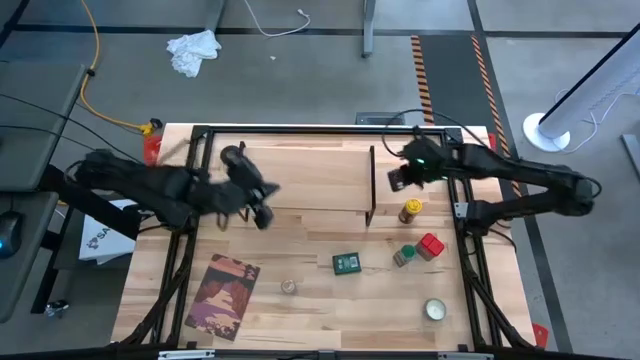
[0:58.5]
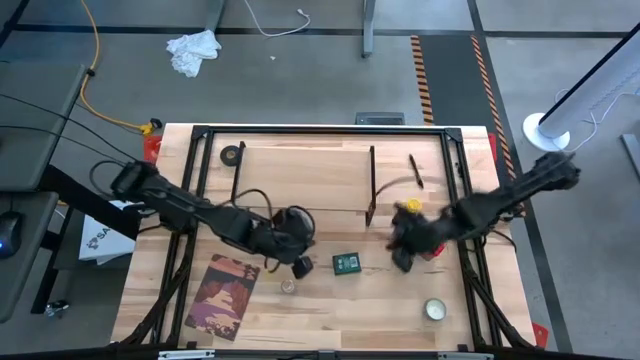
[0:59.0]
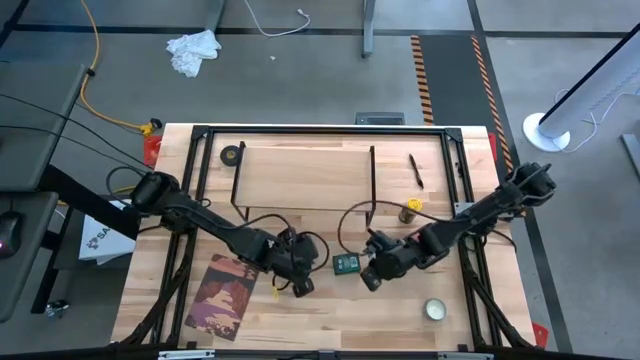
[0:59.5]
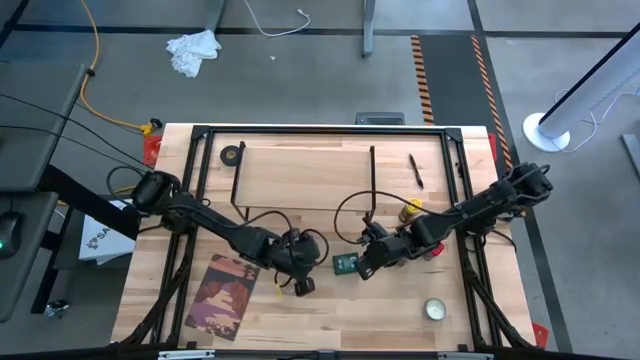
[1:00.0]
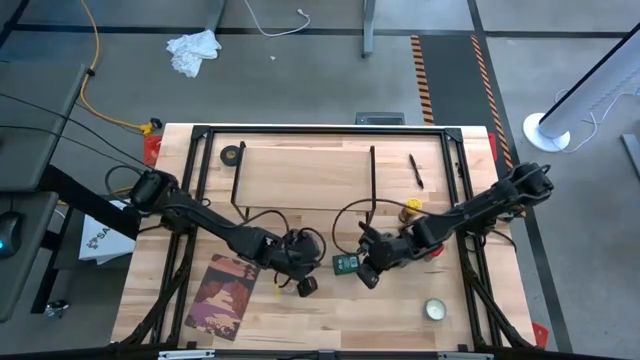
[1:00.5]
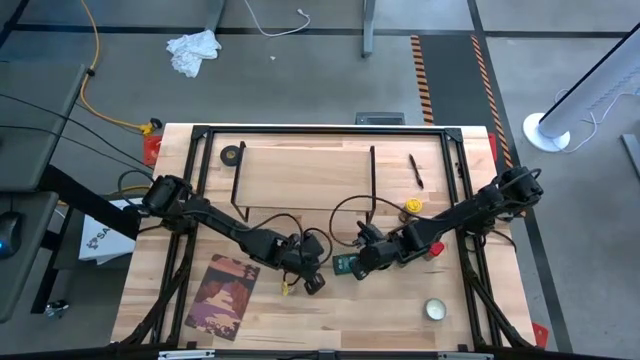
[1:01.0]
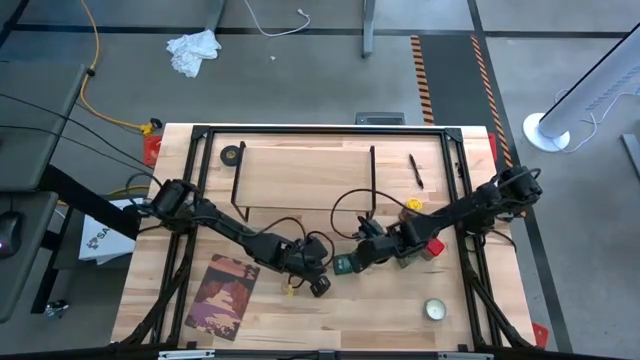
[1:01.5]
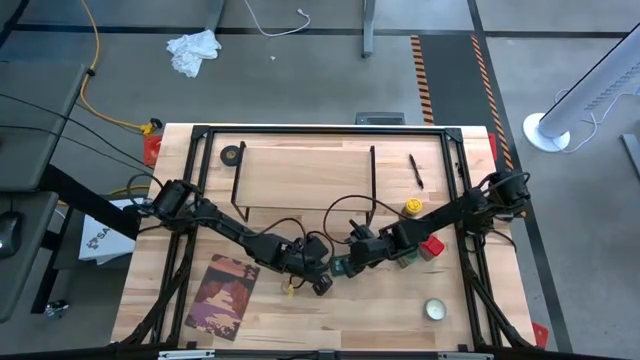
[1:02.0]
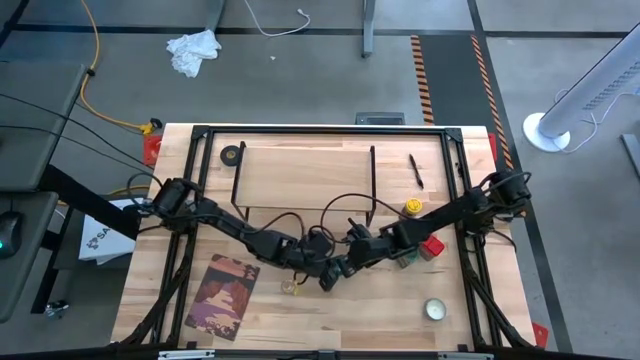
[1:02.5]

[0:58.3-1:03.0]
Task: Shelf spices
Put the green seasoning can on the shelf

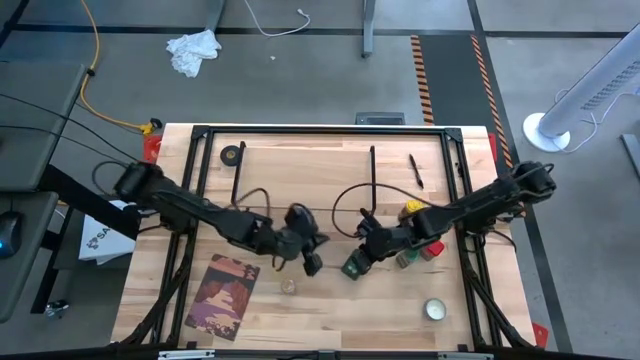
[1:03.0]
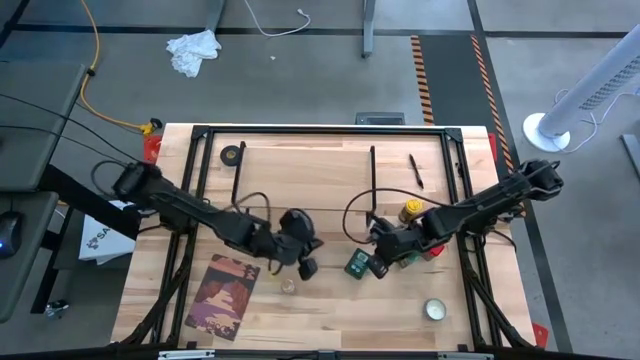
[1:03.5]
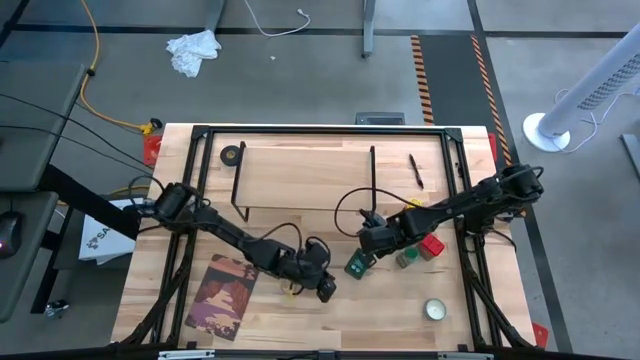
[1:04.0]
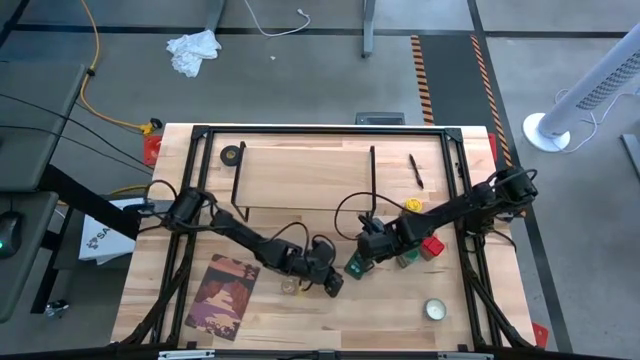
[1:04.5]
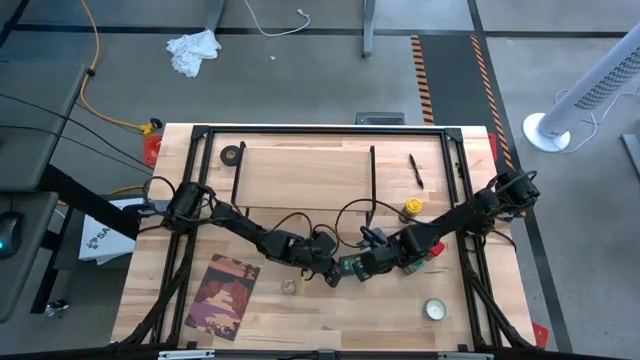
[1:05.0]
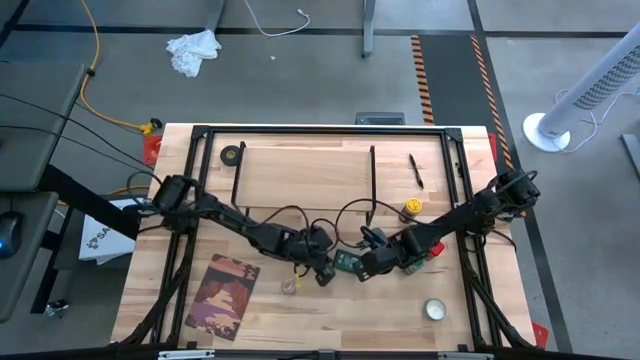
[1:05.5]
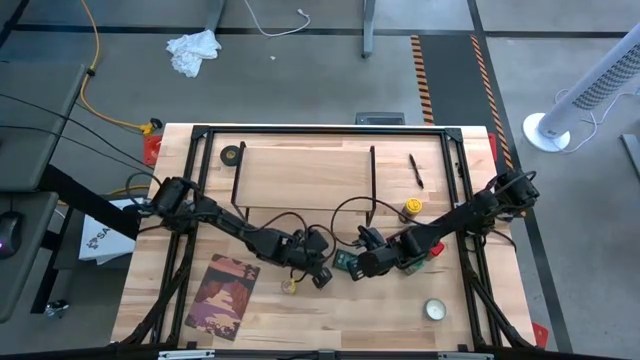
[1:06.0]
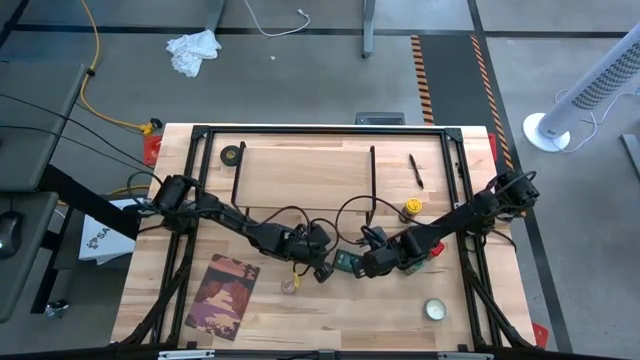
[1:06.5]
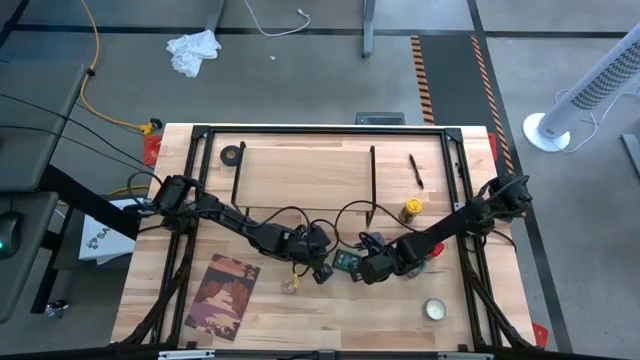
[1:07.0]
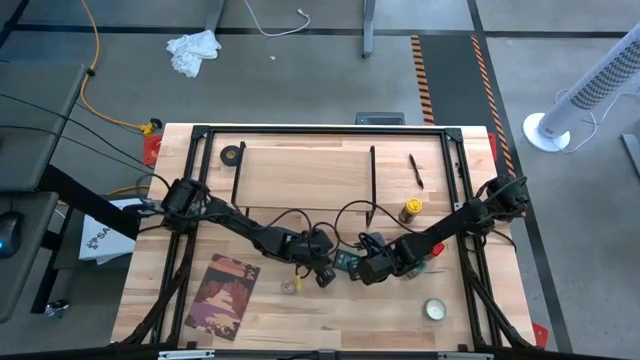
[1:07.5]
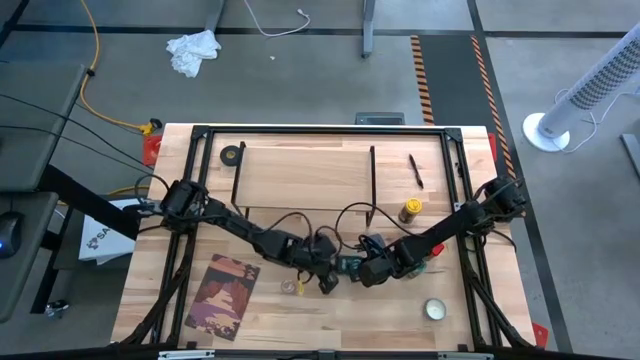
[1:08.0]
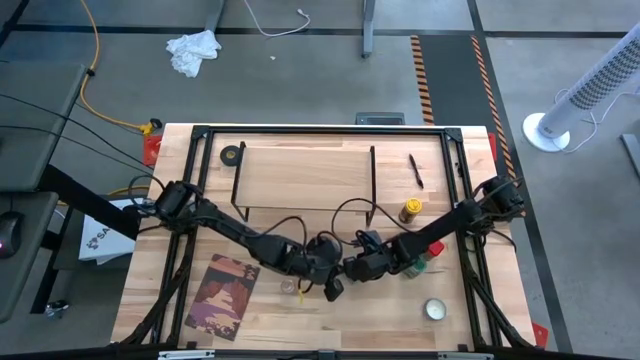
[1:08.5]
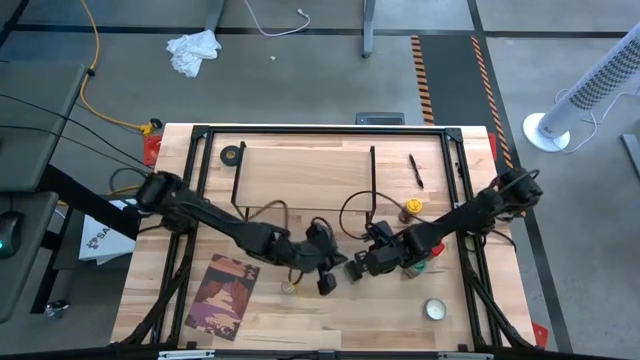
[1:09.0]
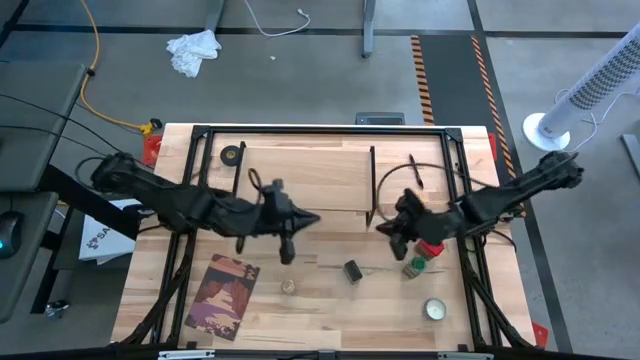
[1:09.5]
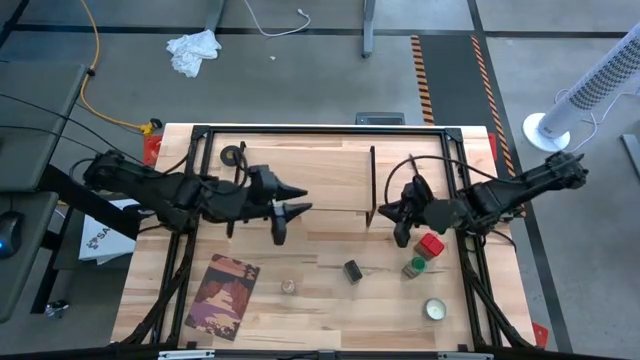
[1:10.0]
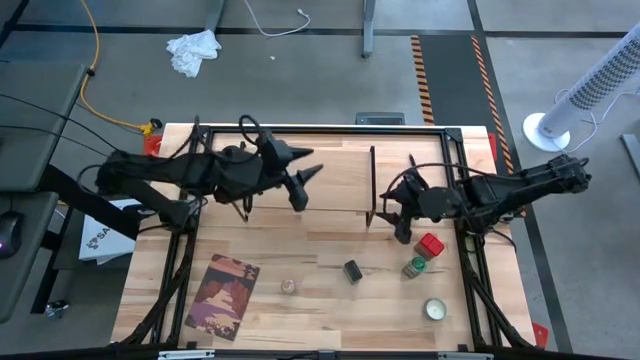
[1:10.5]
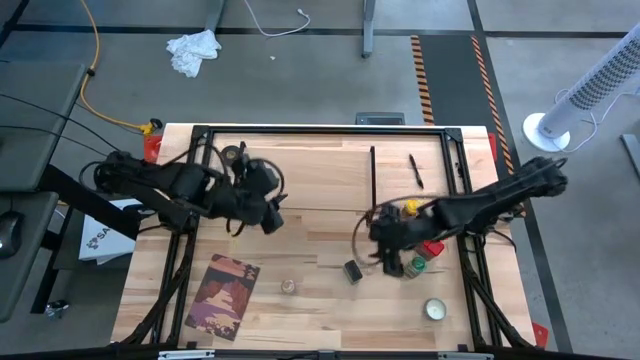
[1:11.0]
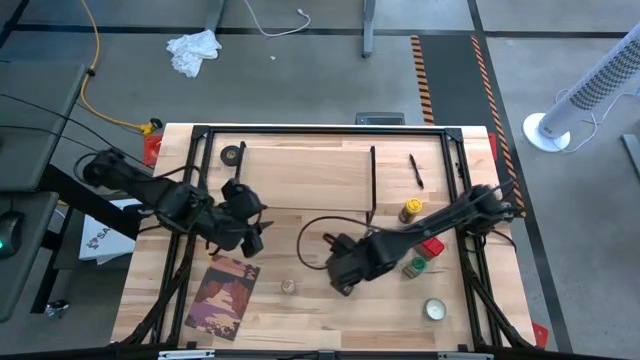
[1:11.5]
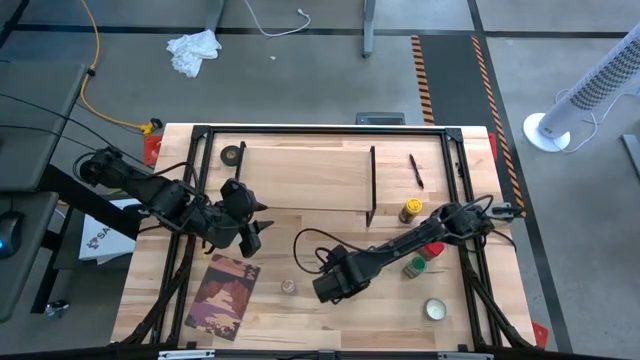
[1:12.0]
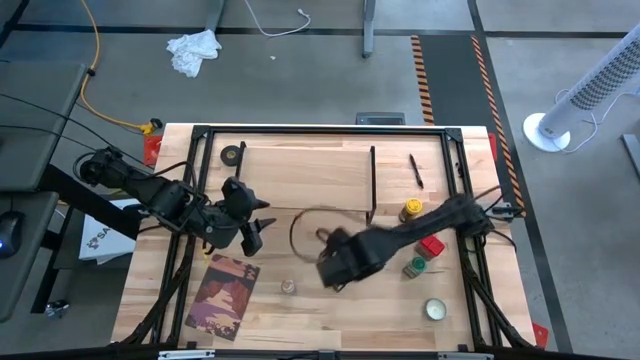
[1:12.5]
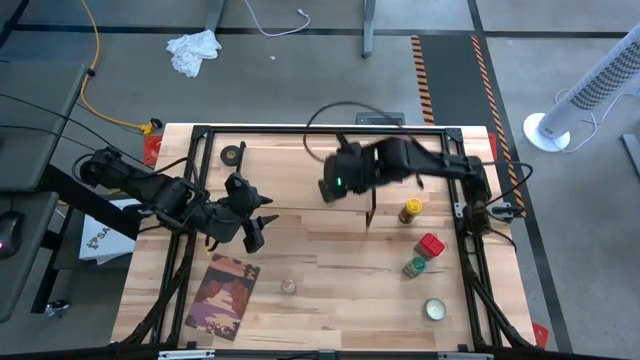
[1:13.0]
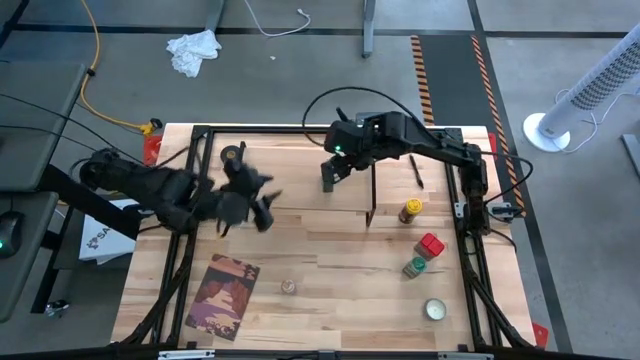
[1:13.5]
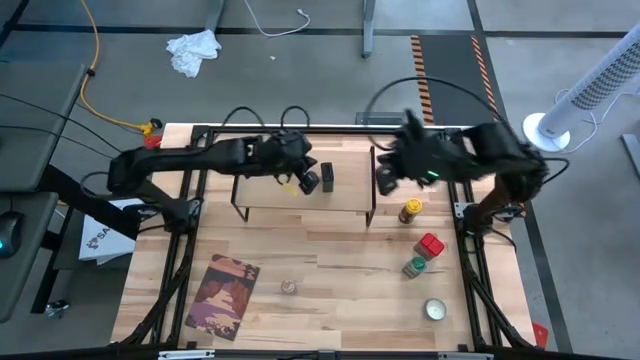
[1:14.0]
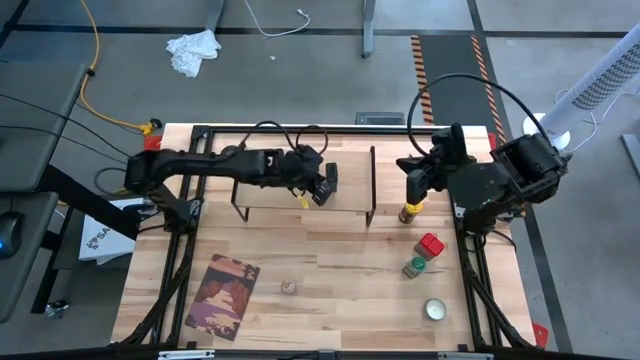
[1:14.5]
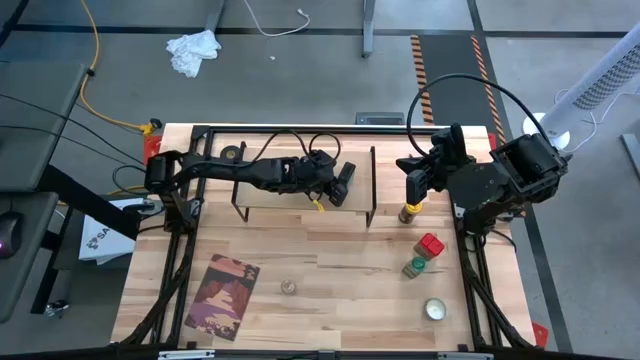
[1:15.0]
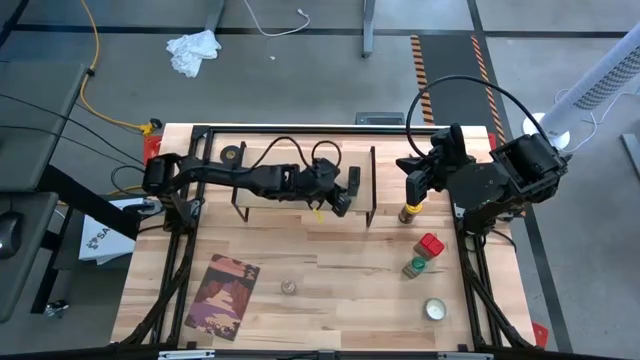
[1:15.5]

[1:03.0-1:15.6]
Put the green seasoning can on the shelf

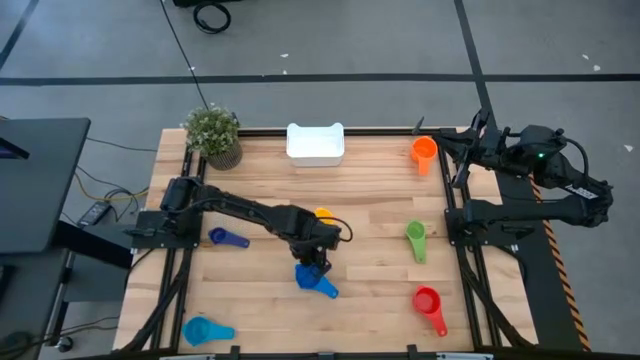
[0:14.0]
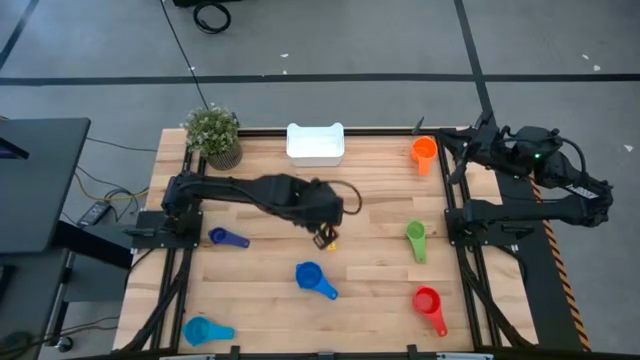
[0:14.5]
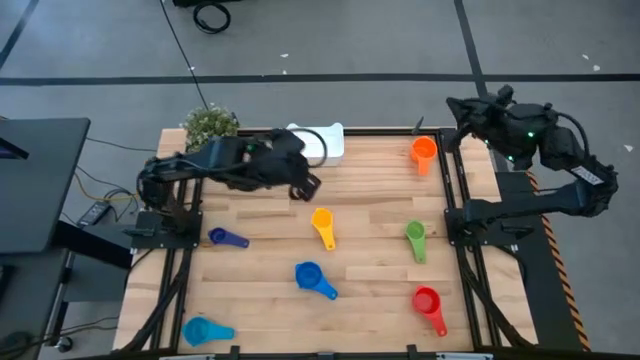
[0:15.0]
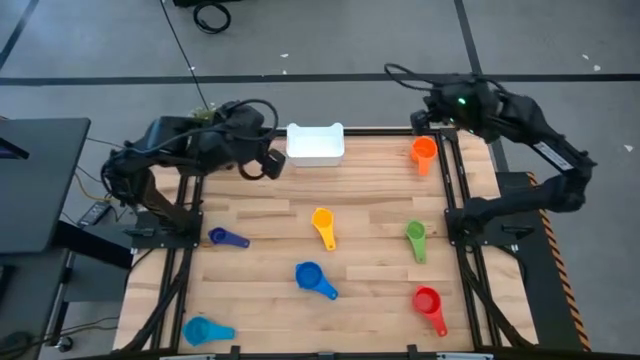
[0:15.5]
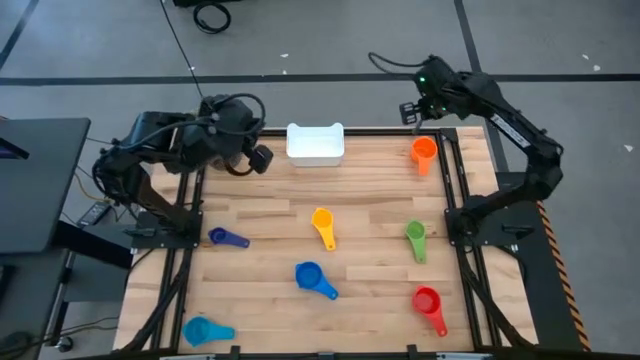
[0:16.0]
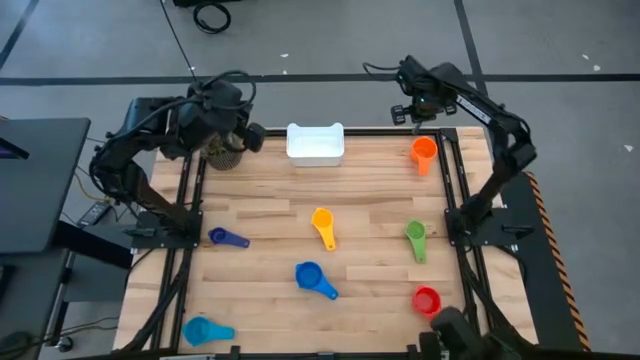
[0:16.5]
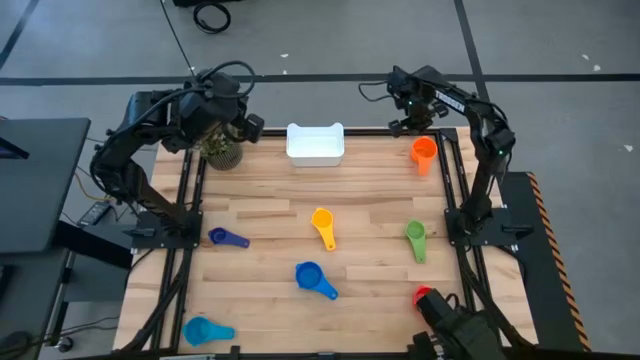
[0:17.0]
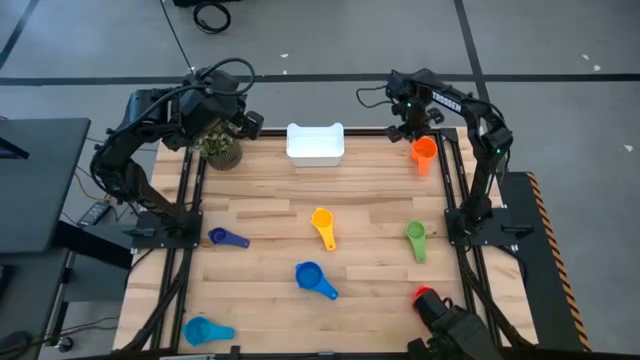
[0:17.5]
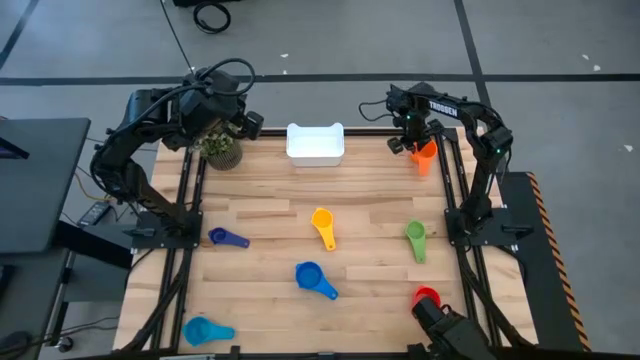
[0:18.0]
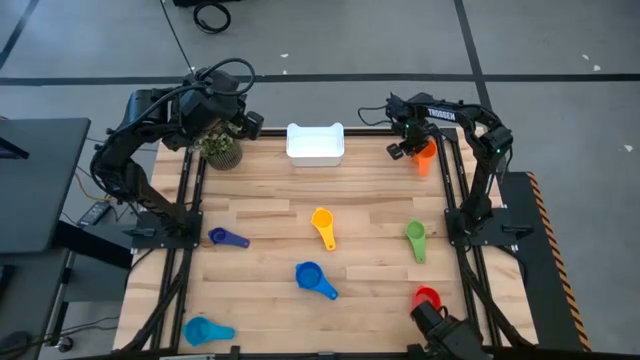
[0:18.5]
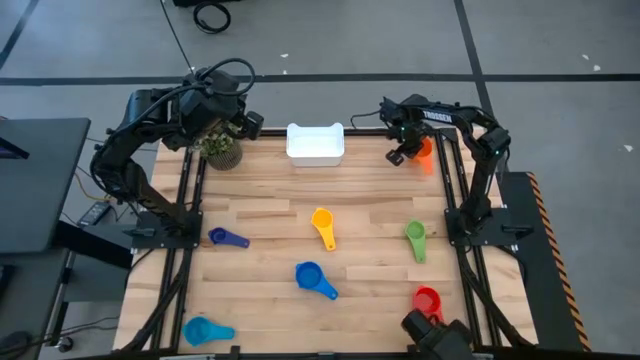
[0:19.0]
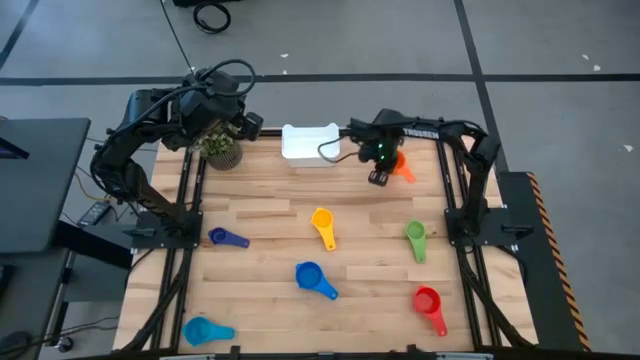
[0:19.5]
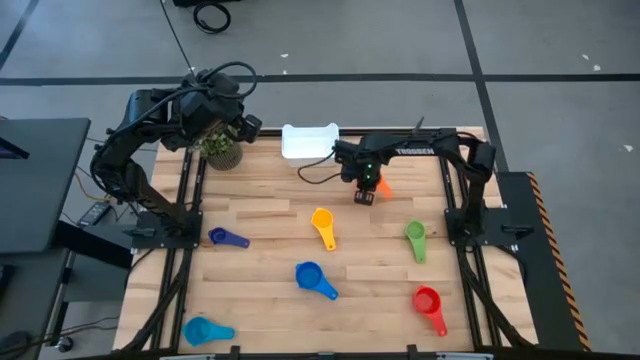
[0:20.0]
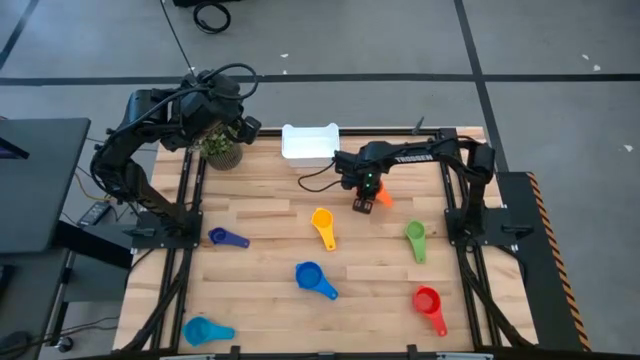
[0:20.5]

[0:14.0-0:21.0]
Task: Nest measuring cups in basket
Move the orange measuring cup
